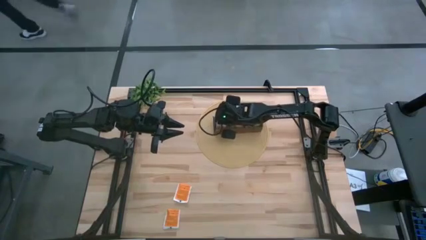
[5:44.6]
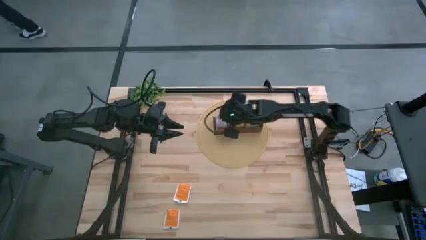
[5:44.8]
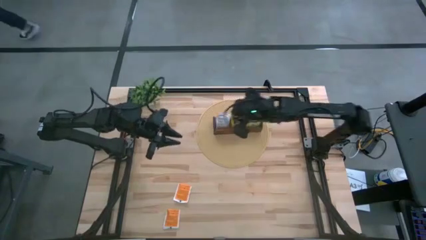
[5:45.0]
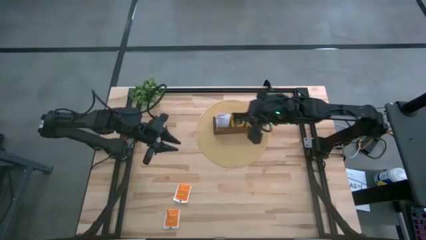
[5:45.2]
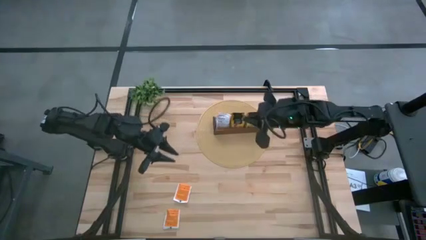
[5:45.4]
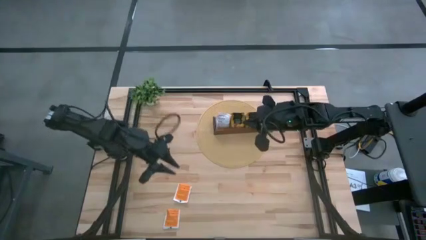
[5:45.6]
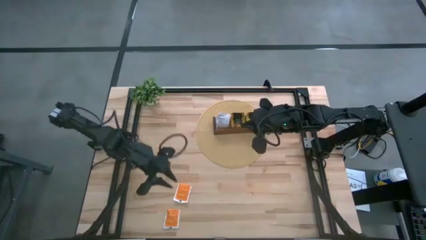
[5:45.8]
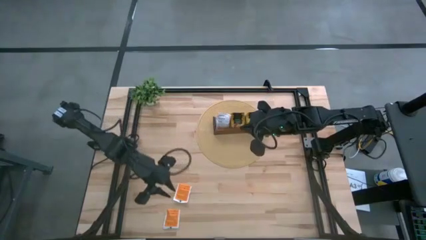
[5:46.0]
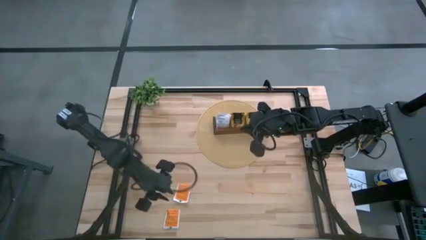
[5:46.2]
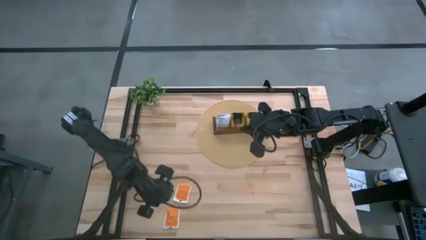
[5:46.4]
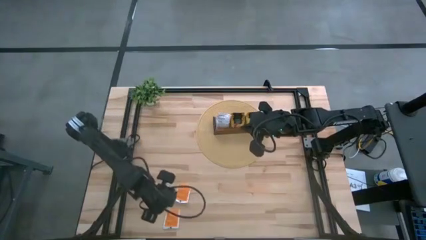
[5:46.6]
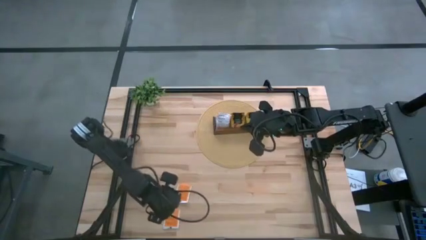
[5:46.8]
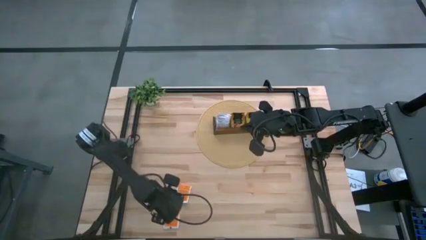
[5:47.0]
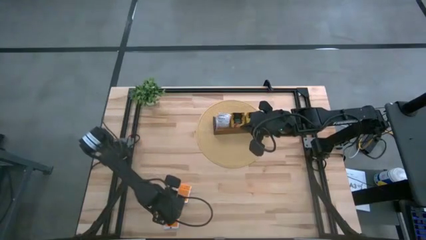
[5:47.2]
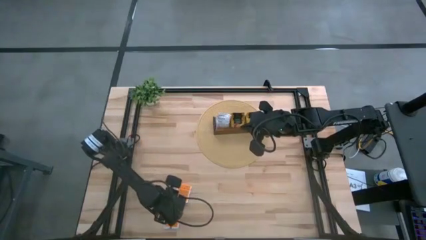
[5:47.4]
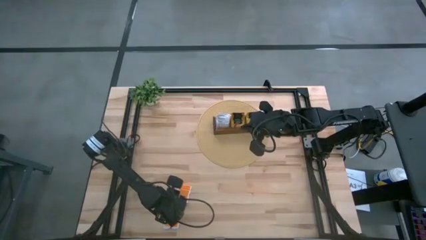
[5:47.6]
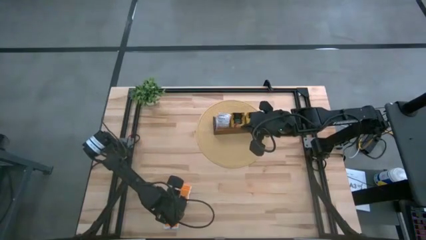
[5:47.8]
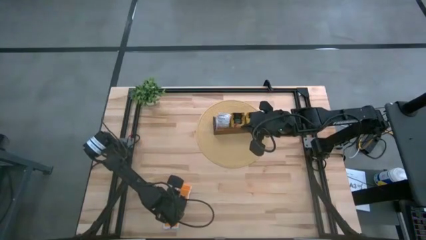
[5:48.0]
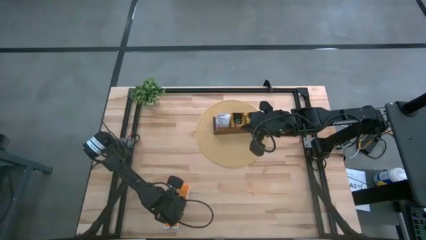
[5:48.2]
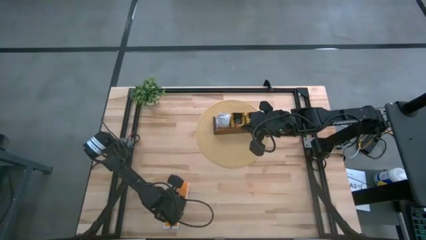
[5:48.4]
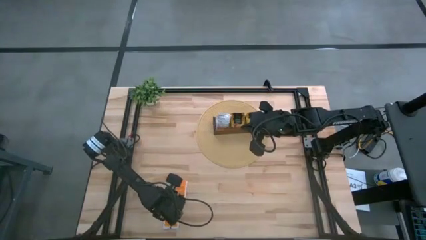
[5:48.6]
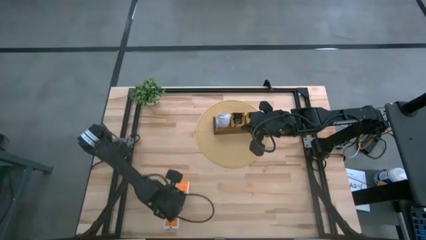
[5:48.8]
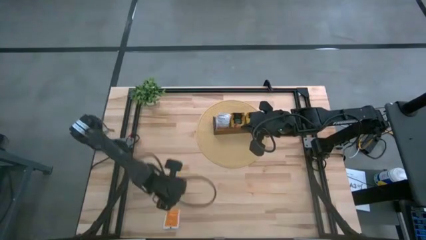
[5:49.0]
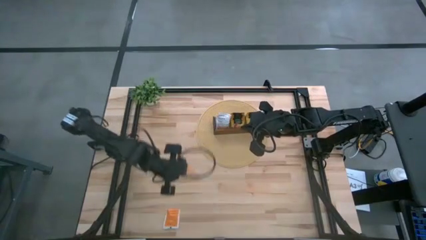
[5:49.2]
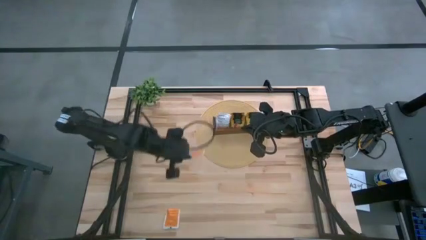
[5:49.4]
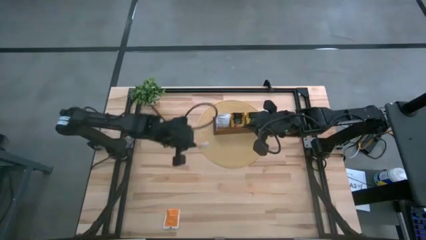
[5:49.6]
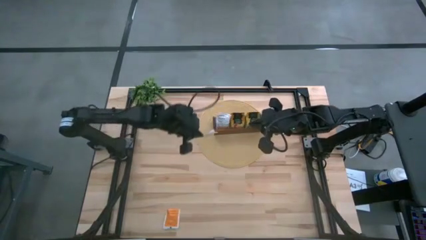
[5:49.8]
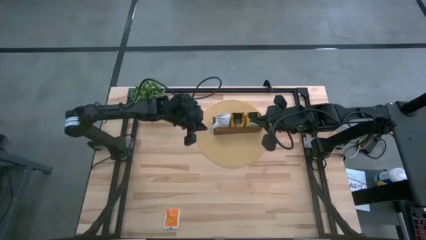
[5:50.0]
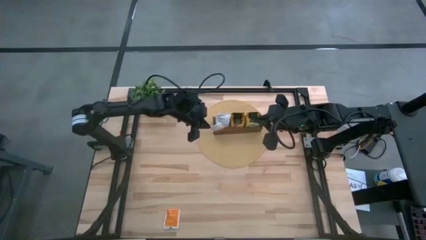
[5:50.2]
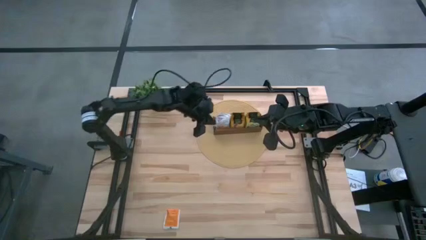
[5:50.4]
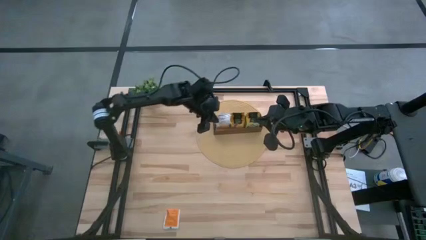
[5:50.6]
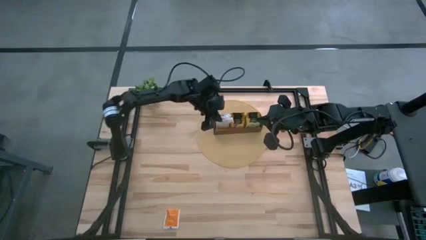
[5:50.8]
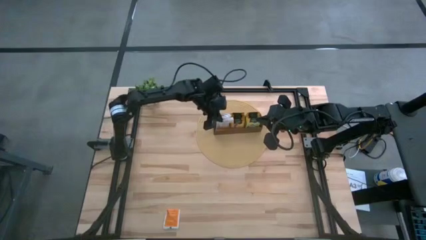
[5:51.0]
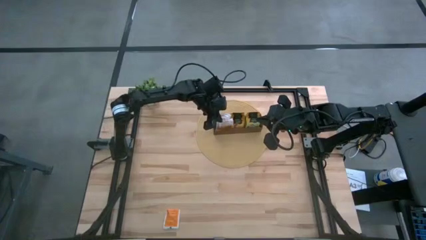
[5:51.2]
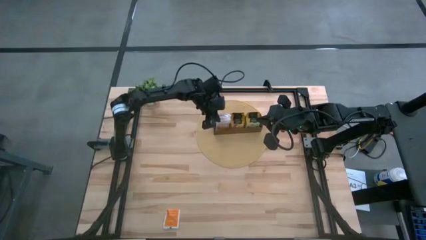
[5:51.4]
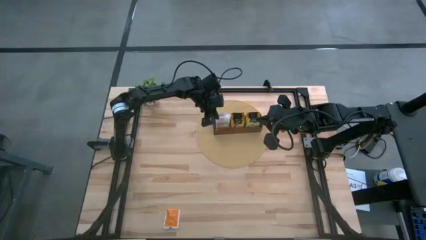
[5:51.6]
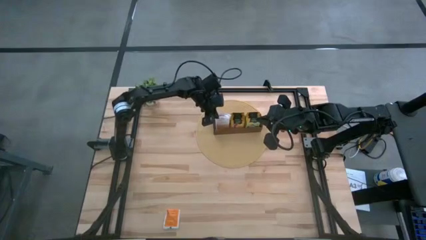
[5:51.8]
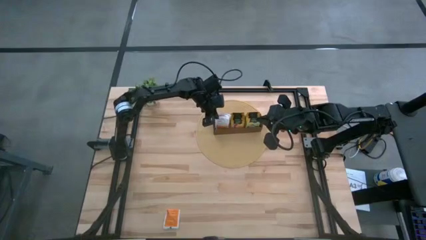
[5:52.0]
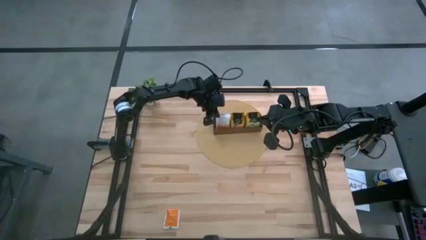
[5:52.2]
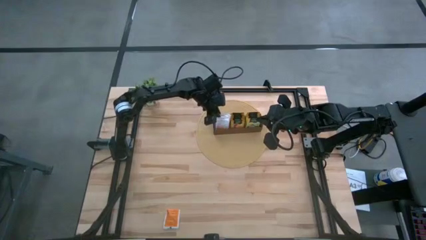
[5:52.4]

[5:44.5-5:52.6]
Task: Pick & Place Tea
Put the top white tea bag into the left section of the wooden organizer

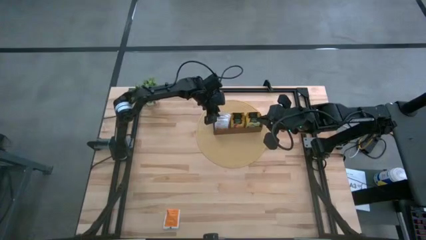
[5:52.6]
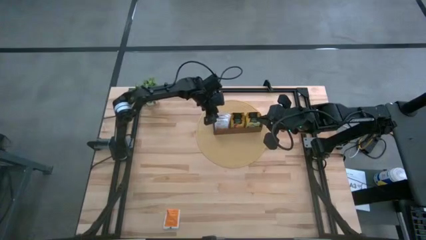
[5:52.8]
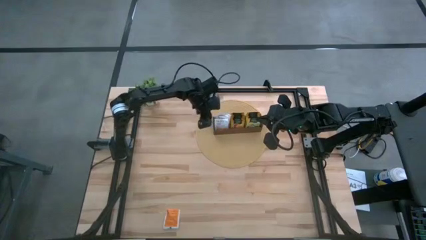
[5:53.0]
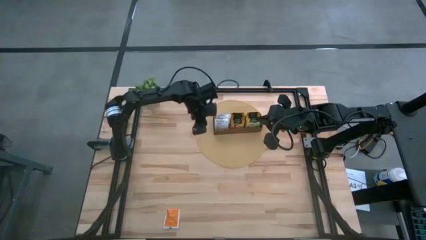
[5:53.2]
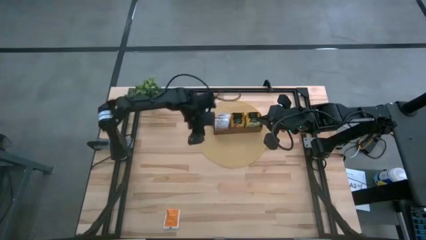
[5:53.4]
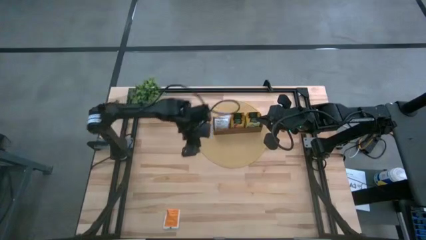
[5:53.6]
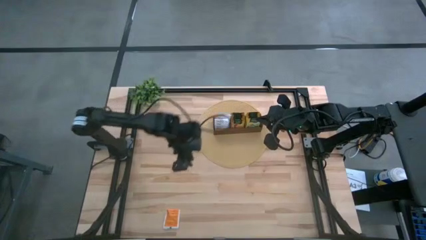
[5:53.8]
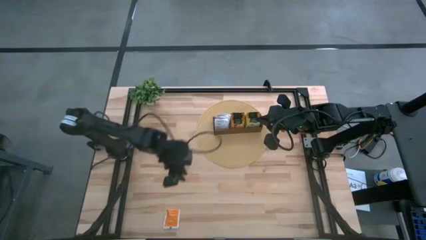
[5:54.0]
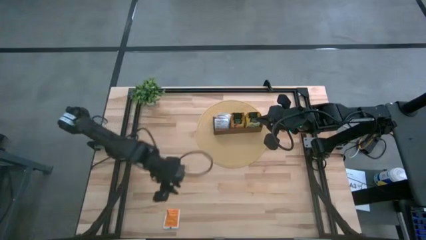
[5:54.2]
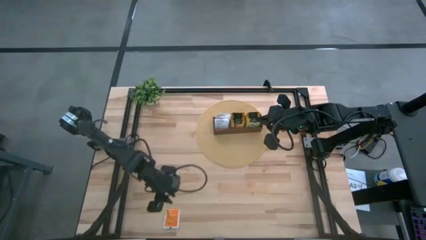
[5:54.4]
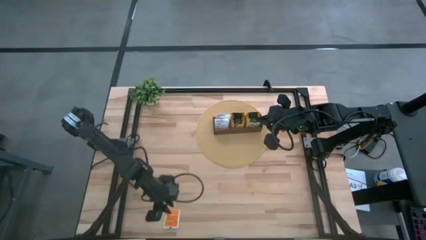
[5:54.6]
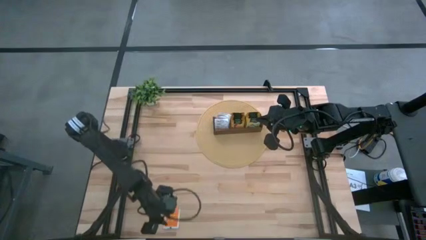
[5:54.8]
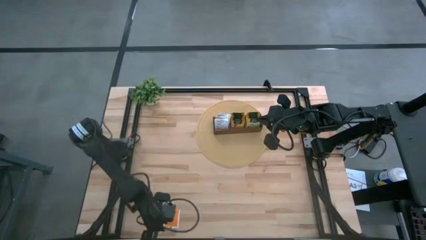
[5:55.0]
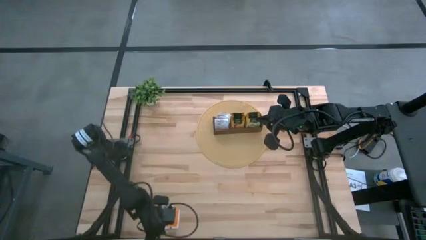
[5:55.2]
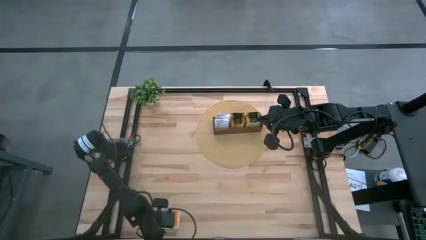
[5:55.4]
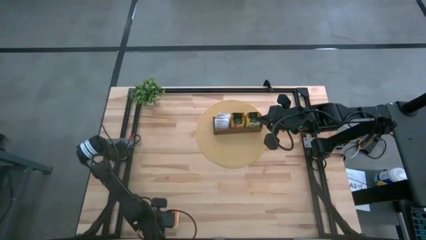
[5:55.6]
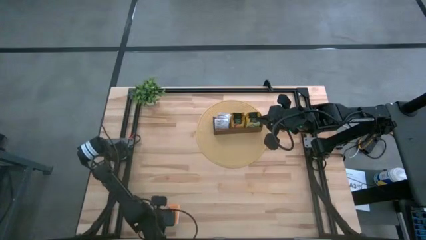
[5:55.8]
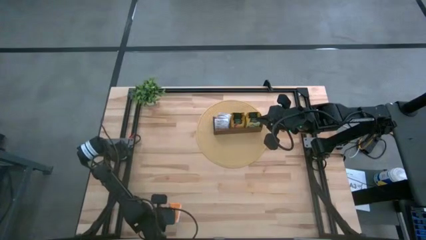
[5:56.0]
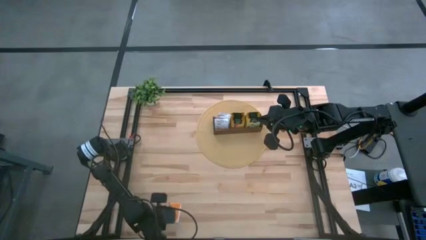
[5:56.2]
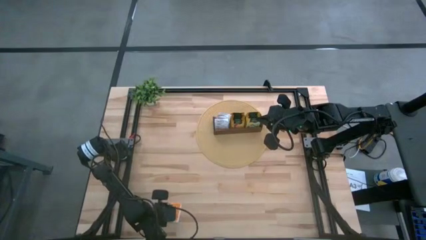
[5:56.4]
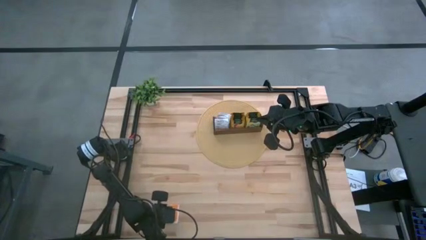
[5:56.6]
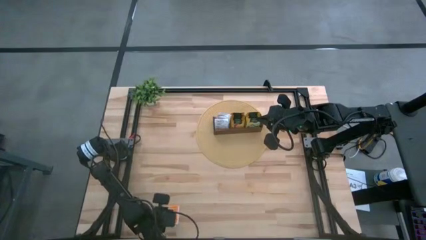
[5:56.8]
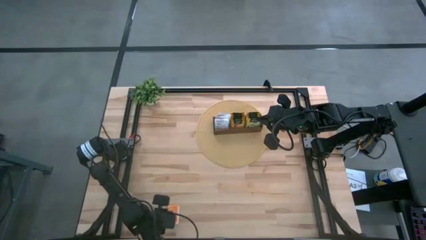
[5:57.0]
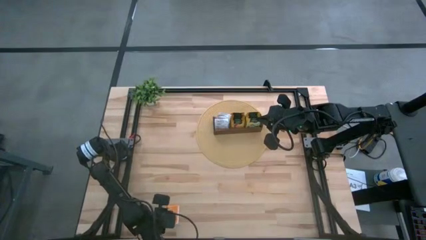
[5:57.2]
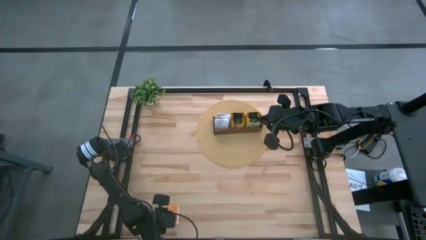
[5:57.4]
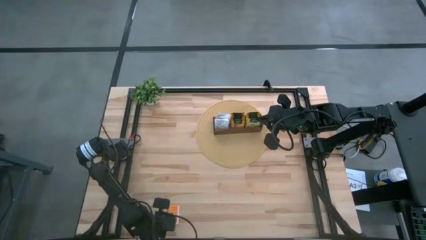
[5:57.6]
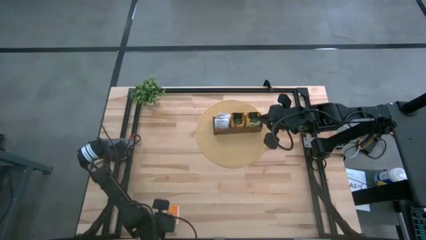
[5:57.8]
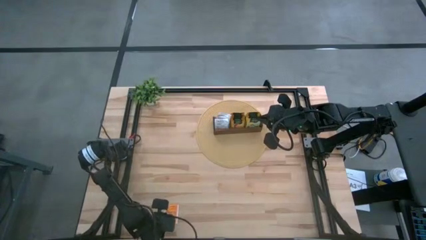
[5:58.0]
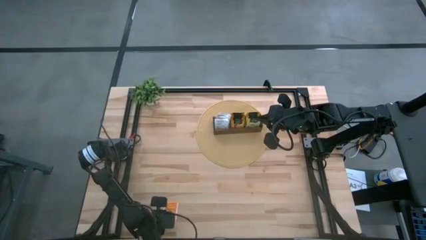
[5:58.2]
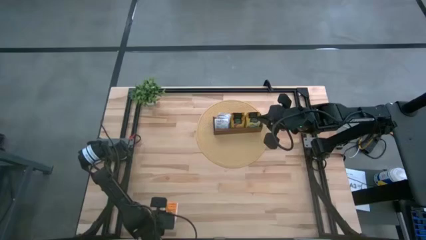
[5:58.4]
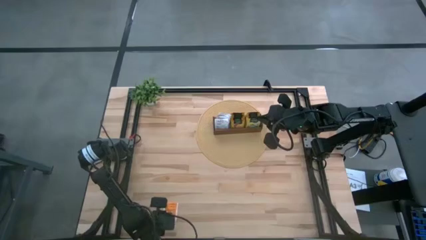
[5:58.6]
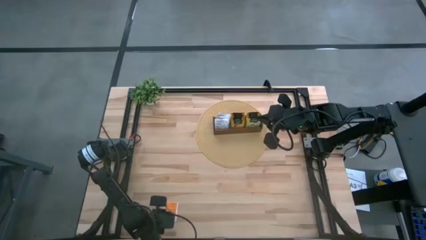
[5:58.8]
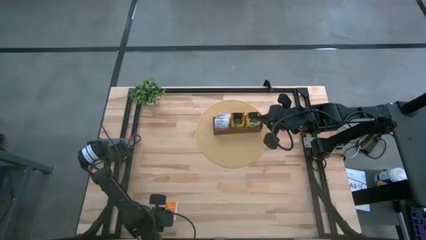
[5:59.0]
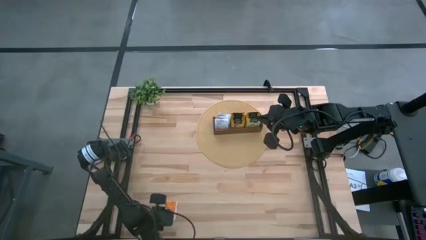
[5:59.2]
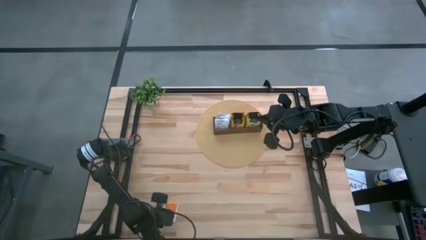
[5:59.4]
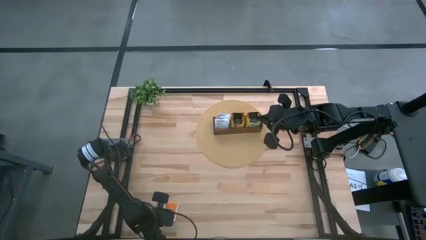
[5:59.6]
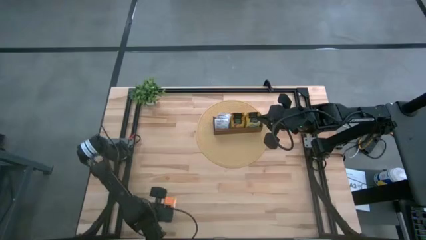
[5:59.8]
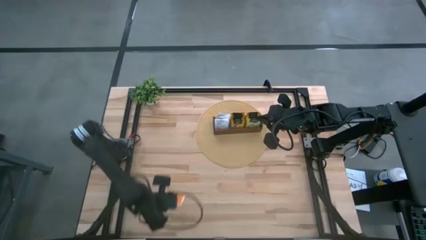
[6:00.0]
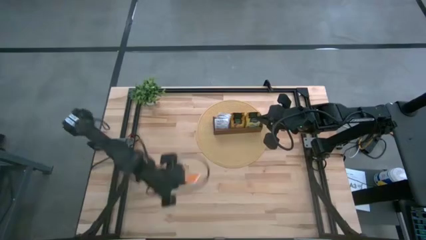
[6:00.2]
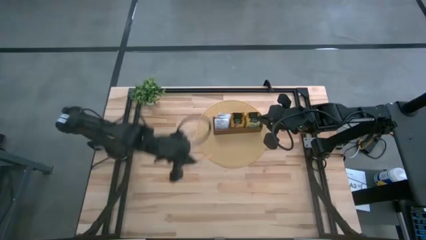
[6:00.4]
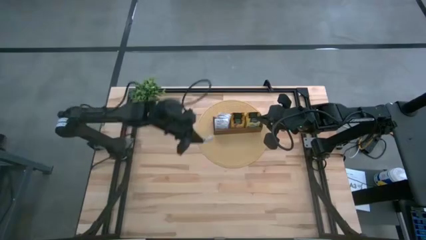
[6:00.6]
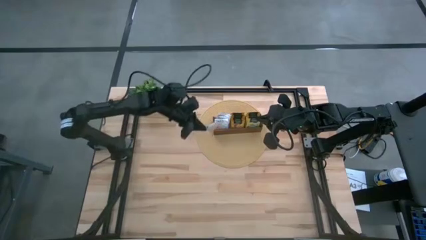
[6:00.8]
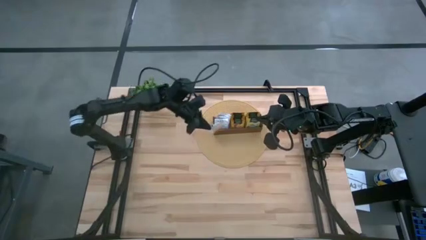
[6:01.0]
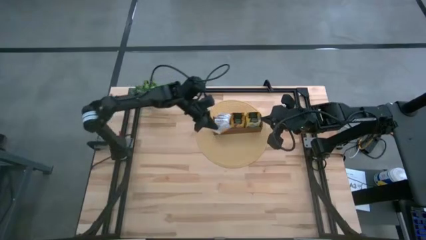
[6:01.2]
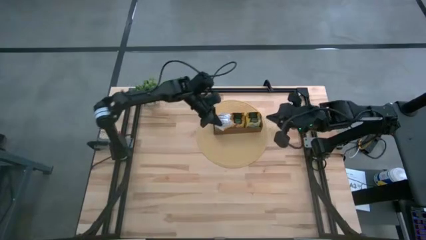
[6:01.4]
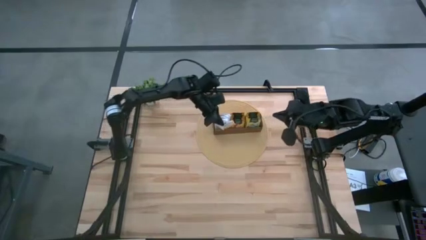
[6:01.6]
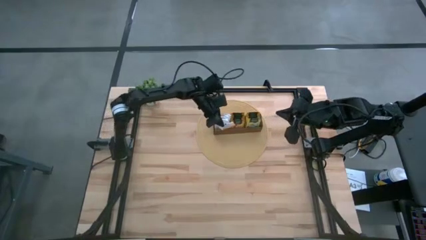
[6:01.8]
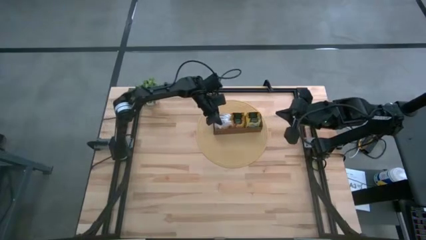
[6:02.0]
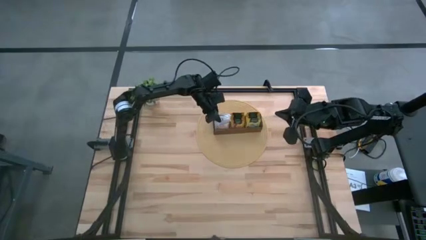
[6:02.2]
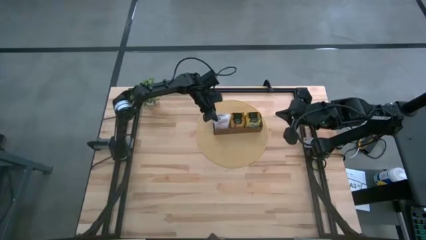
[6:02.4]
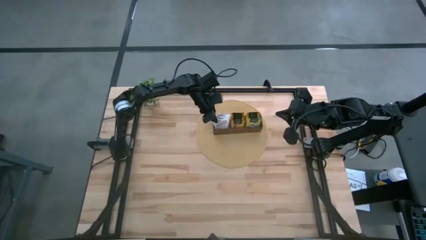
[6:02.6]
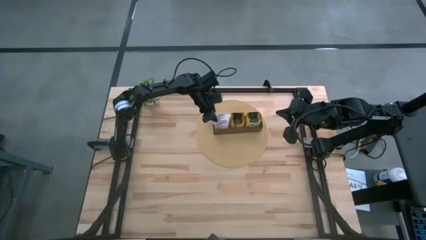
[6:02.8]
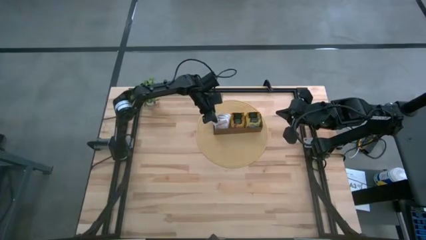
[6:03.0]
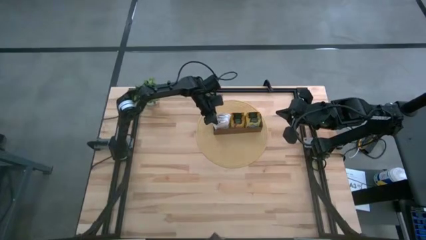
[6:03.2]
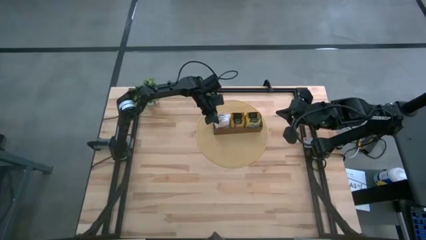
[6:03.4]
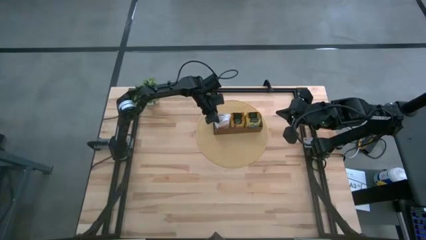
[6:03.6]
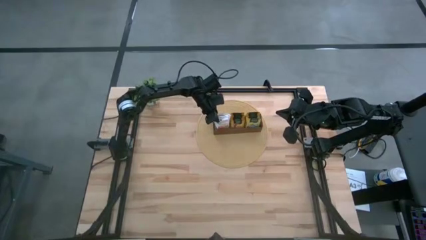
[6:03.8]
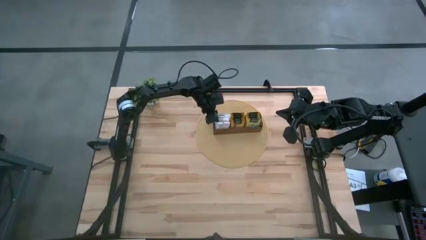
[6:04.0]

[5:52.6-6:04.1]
Put the white tea bag into the left section of the wooden organizer
